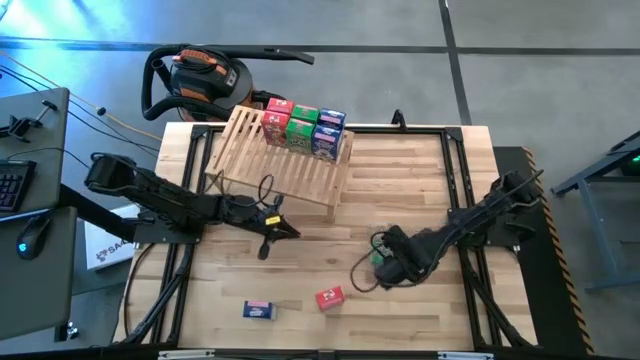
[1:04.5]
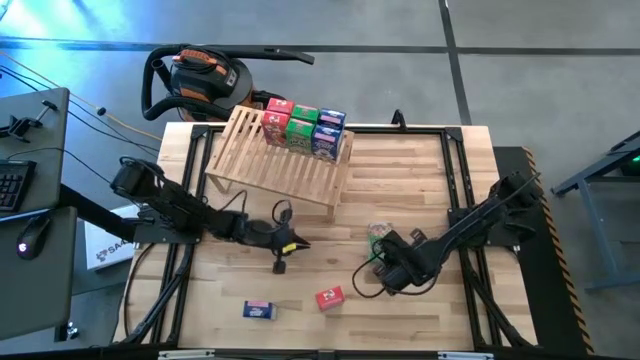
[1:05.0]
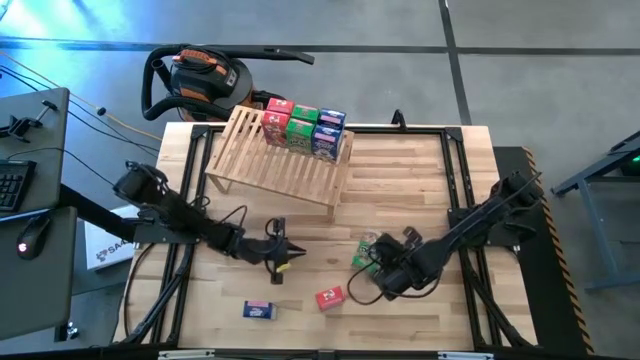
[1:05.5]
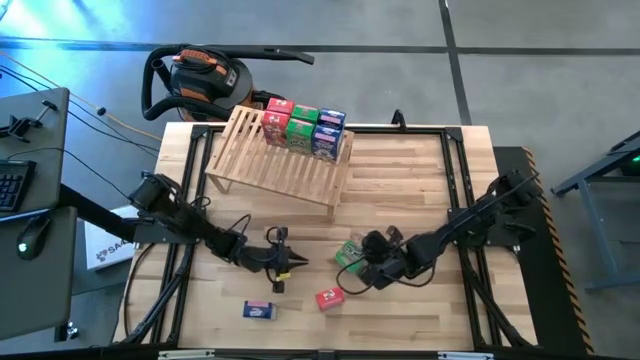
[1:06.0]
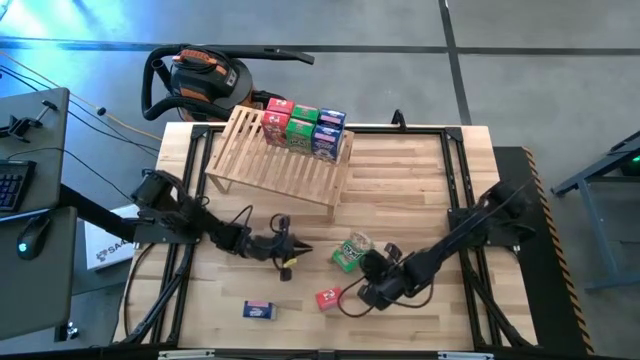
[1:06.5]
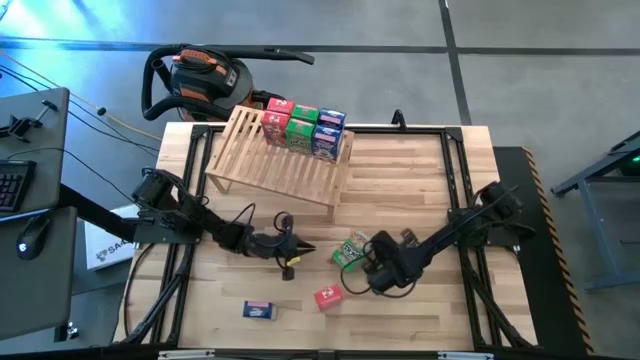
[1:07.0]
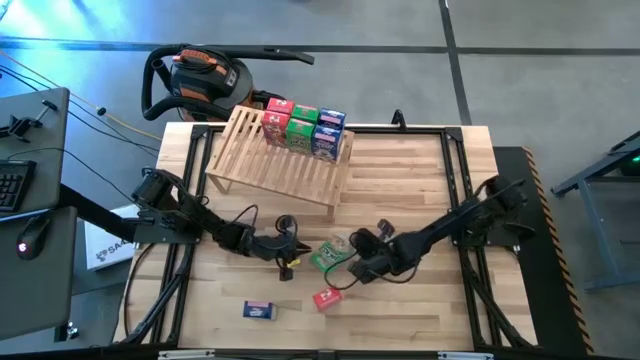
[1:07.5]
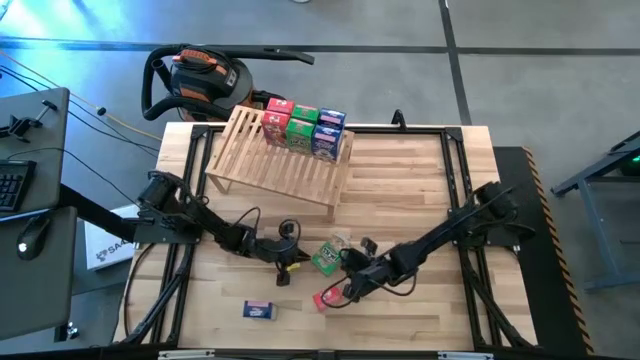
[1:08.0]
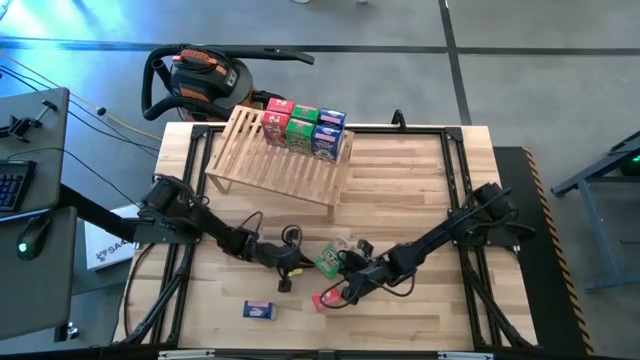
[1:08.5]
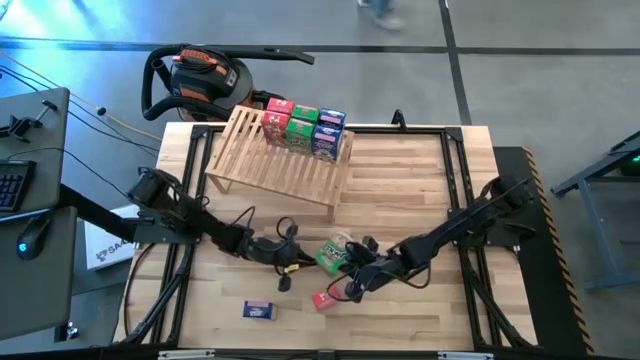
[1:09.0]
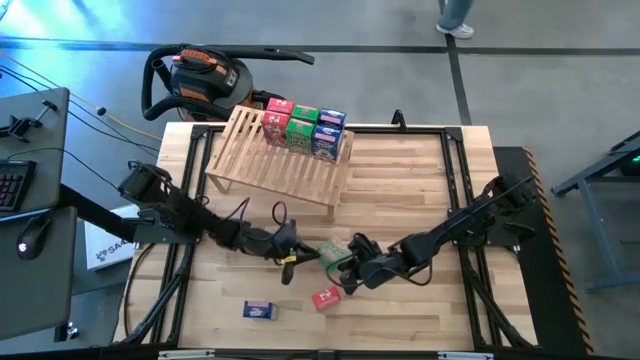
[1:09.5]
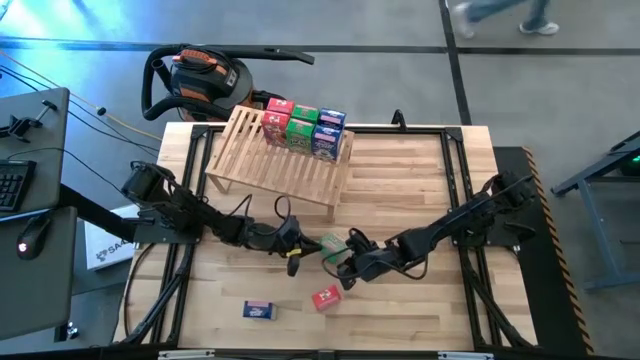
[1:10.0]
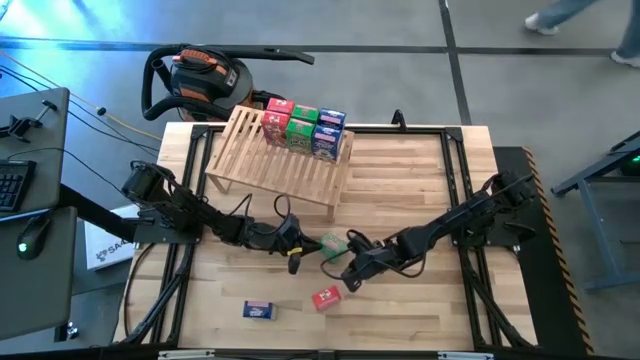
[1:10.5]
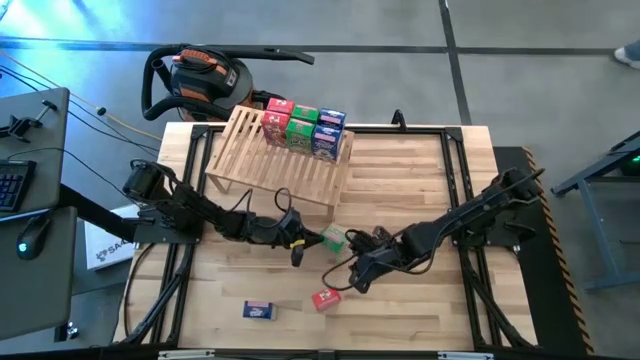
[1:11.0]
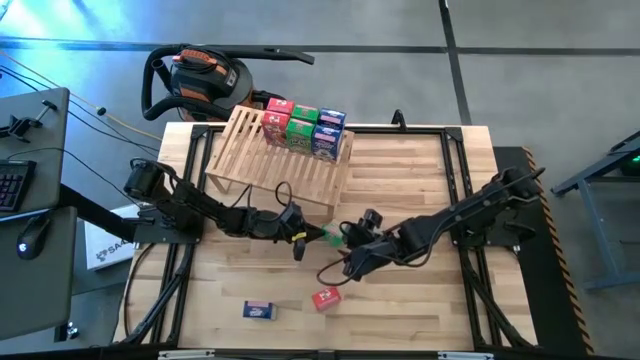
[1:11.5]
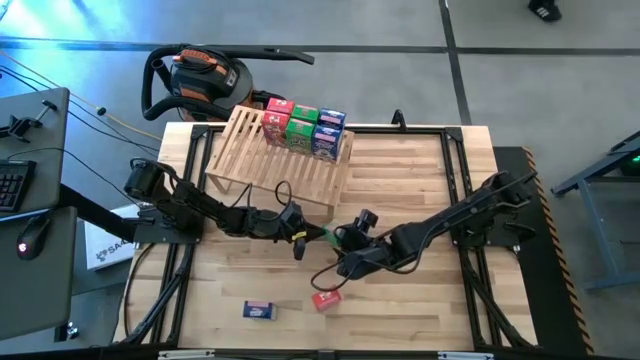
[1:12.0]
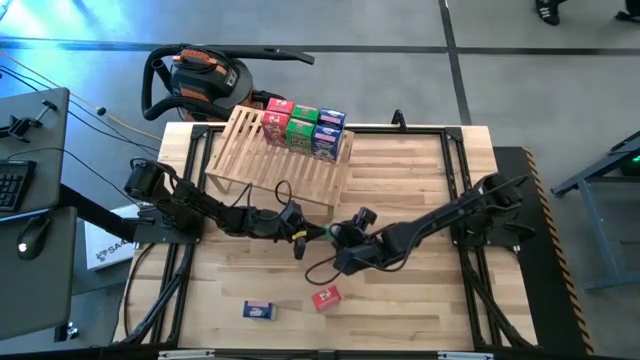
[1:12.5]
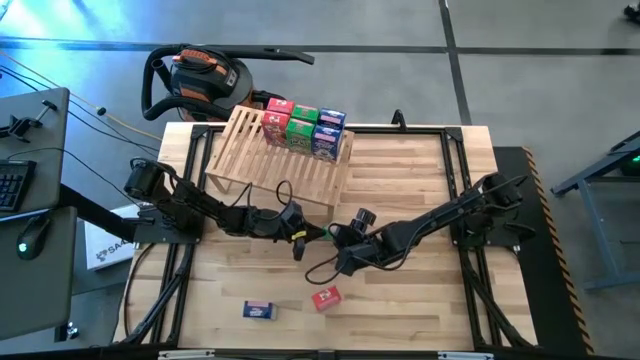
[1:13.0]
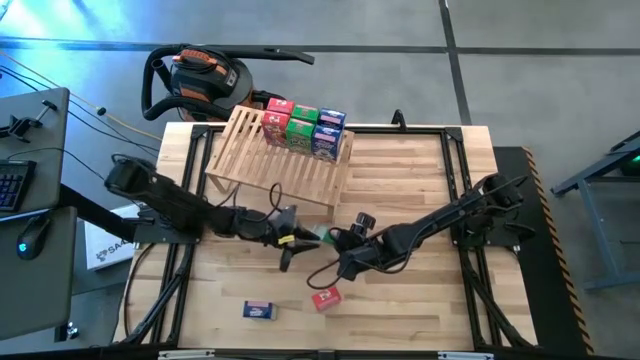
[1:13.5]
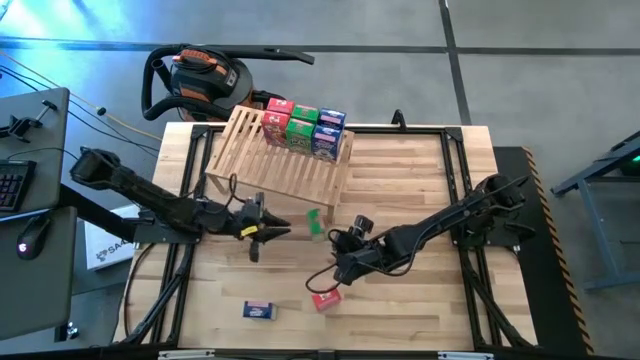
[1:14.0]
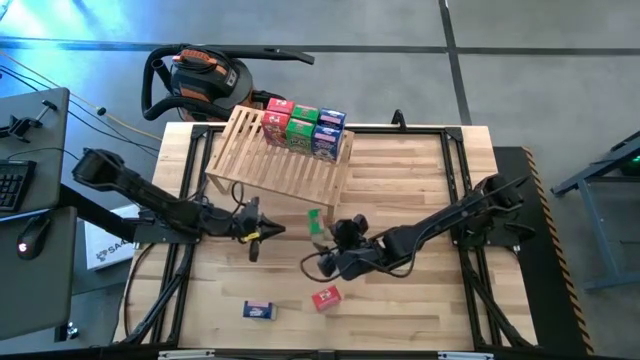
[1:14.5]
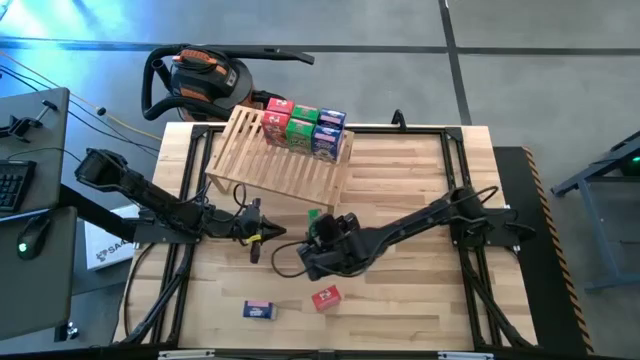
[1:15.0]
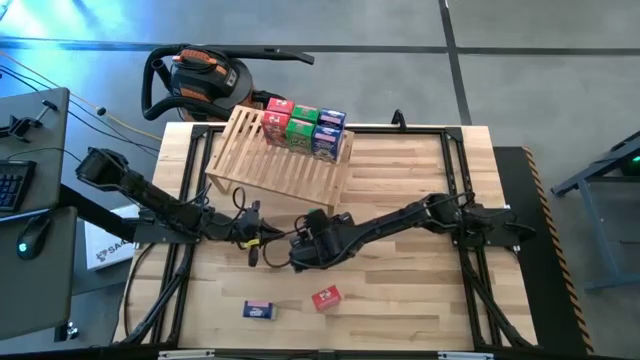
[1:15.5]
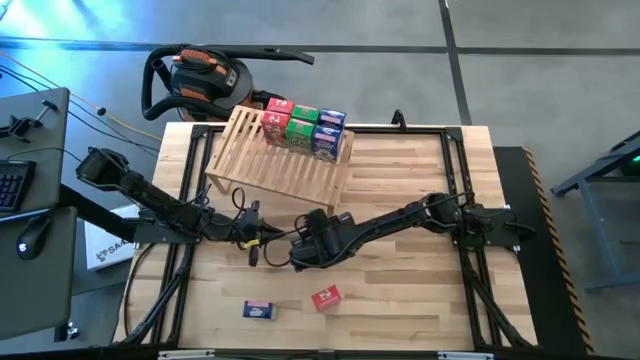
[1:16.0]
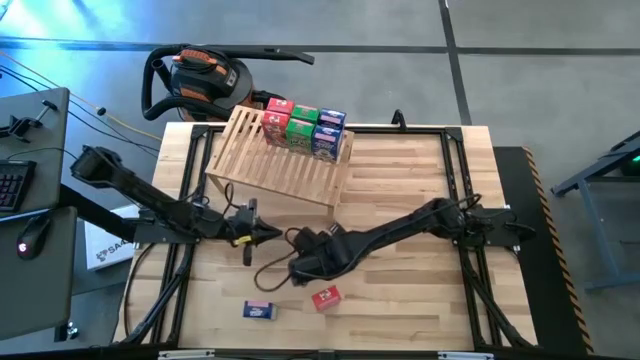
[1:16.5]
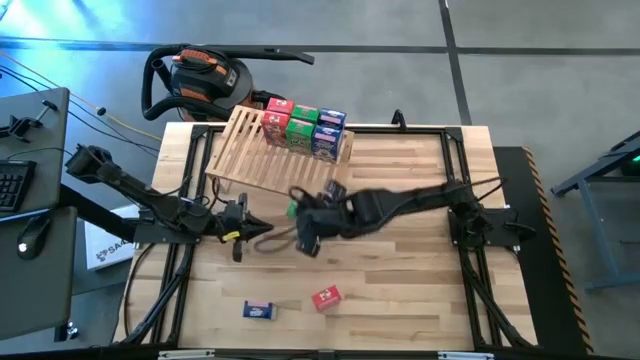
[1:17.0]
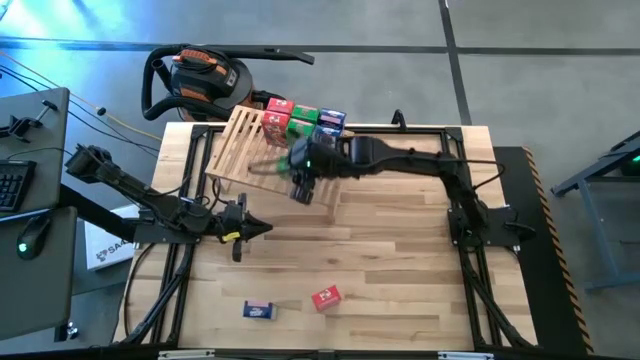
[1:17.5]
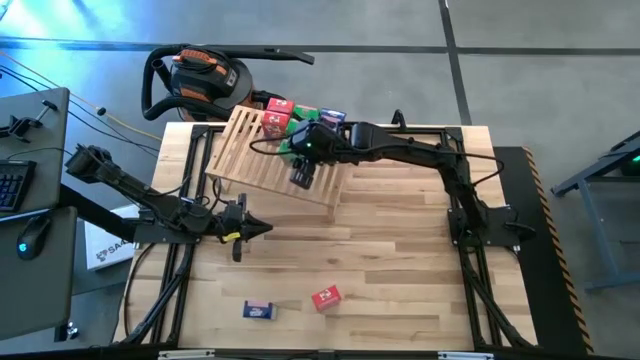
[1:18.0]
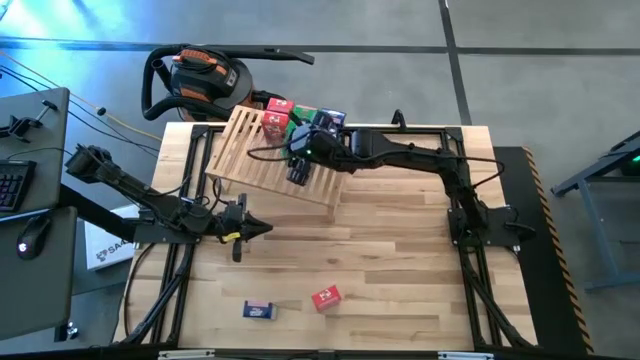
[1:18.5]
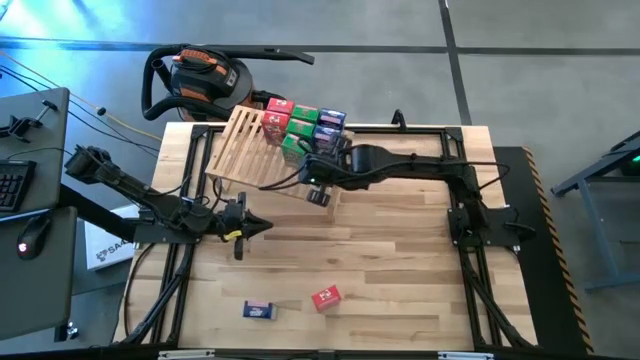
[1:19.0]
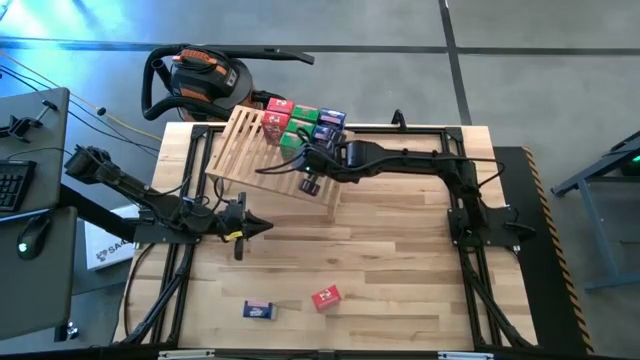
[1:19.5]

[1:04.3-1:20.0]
Task: Stack cereal on shelf
Put the green cereal box aligned with the other green cereal box on the shelf

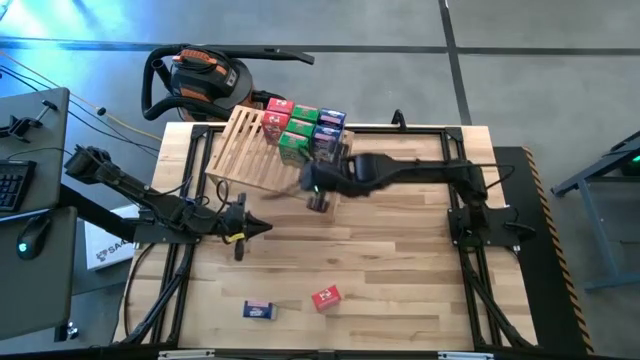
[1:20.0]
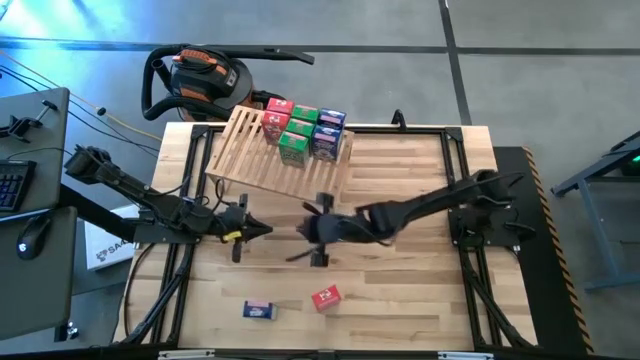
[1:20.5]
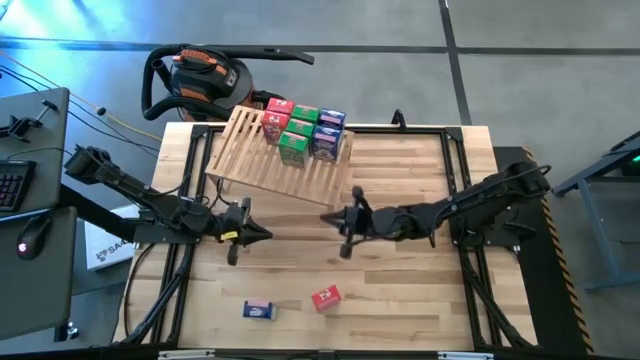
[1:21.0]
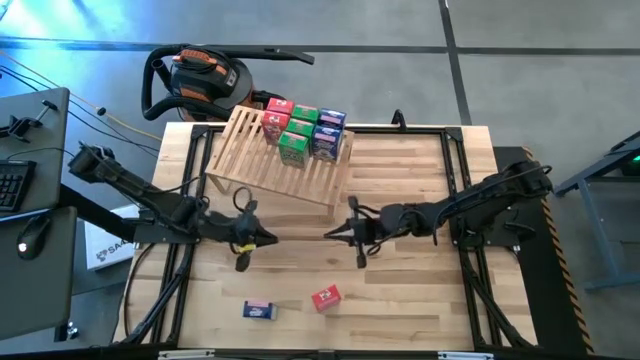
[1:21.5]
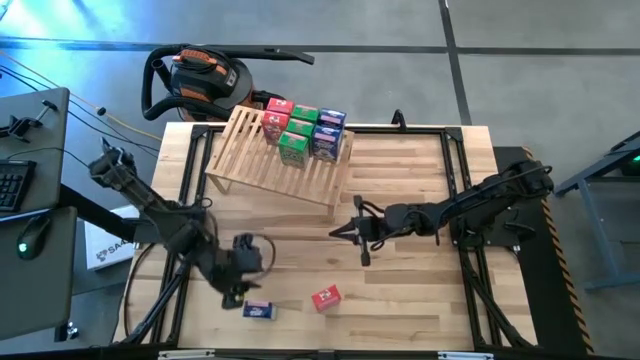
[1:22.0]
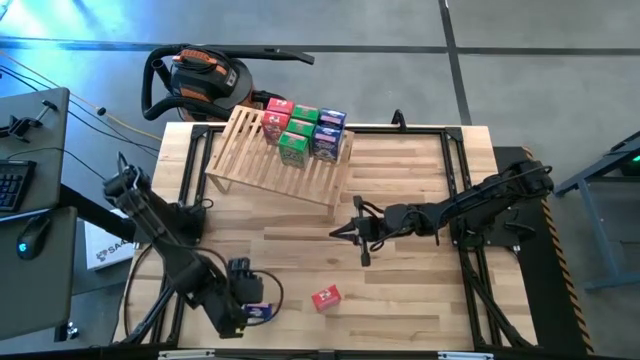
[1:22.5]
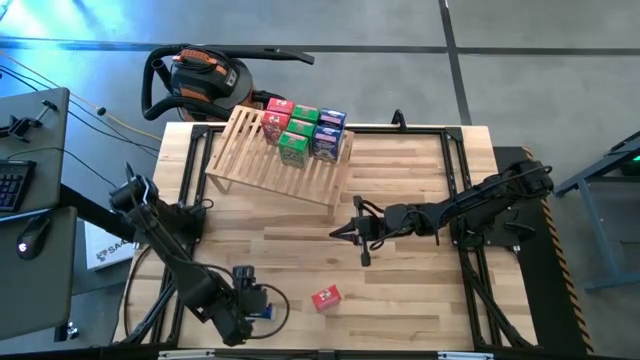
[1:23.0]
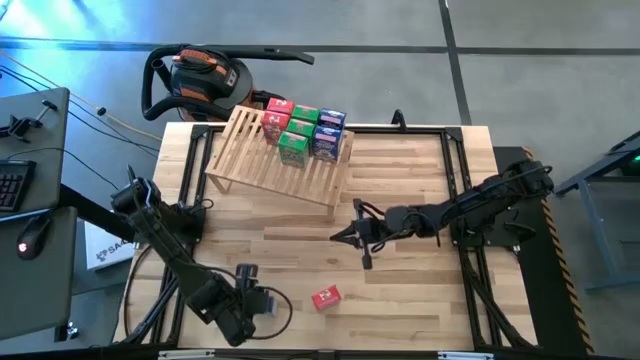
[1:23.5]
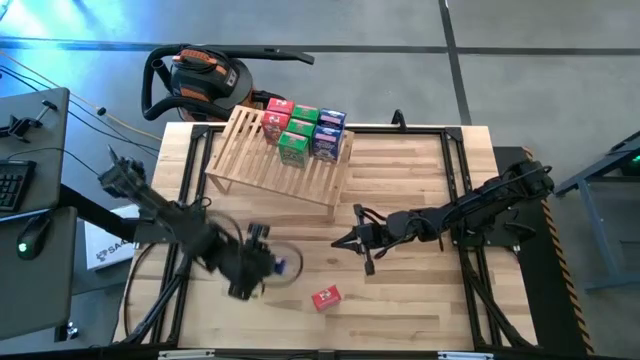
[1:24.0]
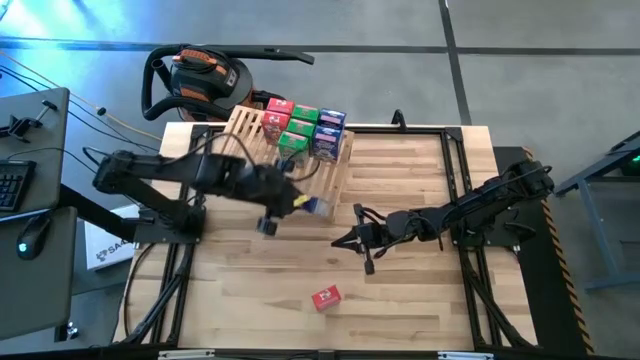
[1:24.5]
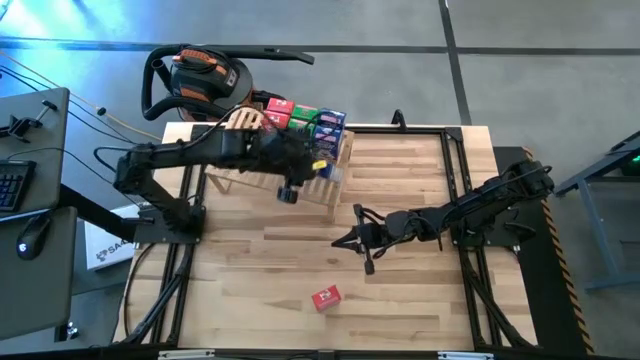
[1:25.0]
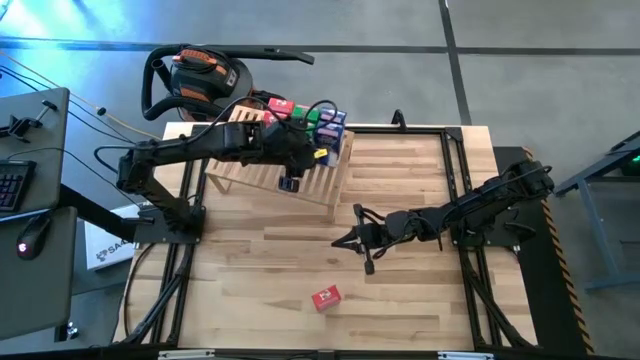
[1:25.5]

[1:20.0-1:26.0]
Put the blue cereal box aligned with the other blue cereal box on the shelf

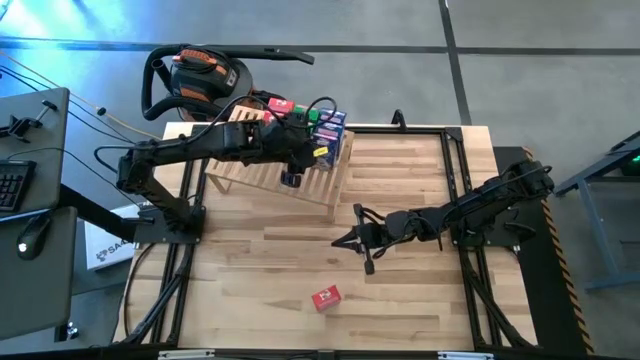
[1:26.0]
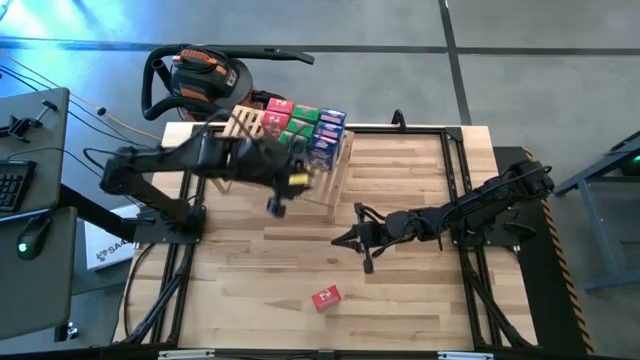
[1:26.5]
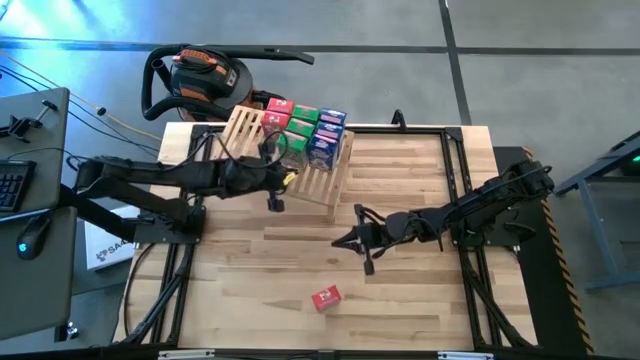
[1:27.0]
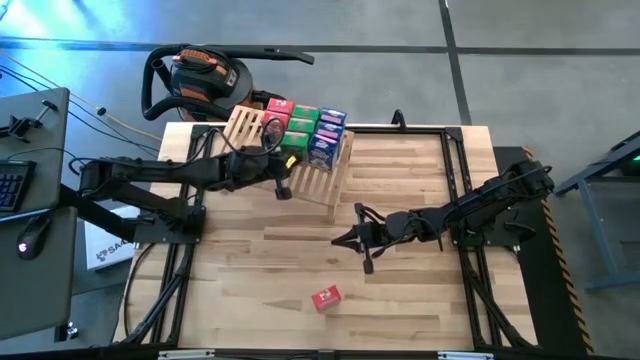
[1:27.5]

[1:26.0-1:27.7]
Adjust the green cereal box on the shelf
